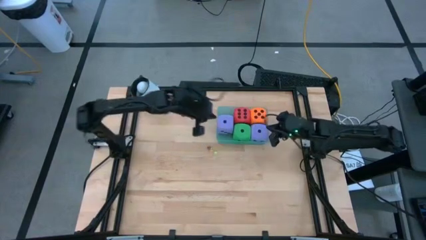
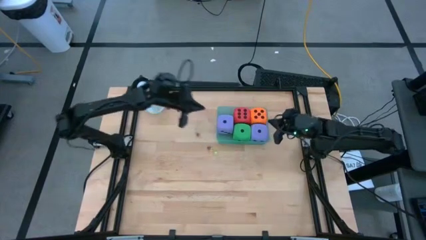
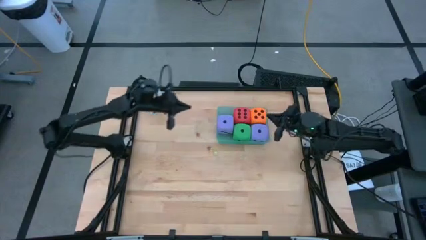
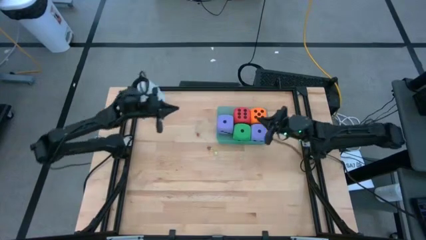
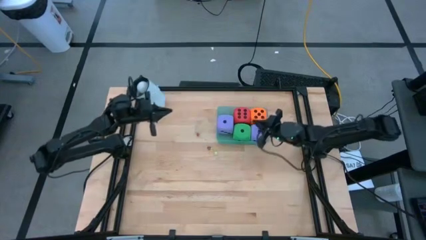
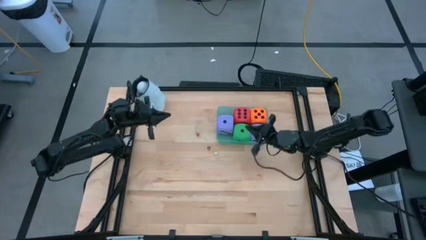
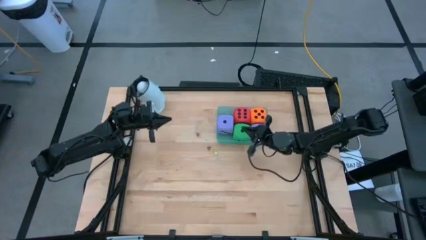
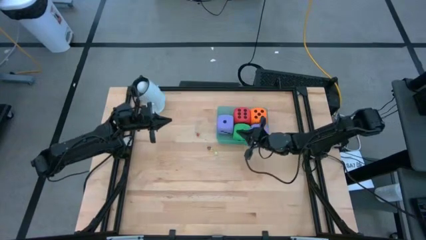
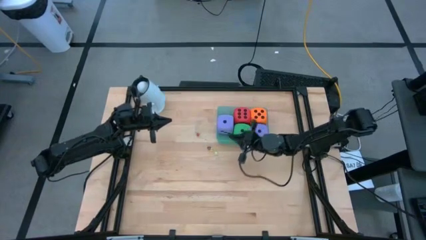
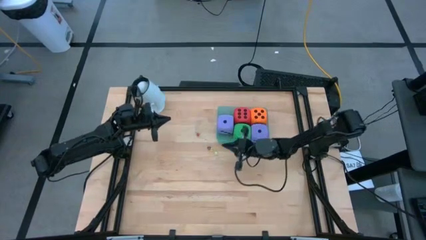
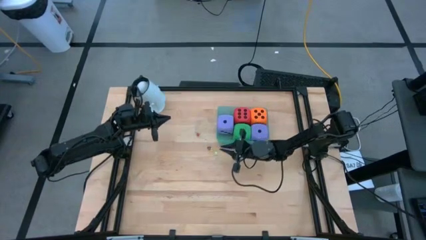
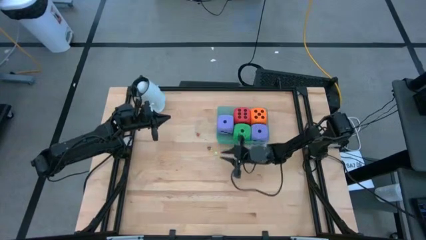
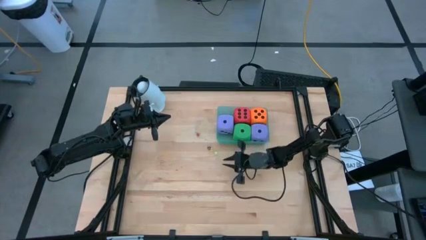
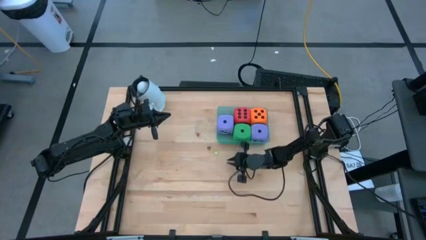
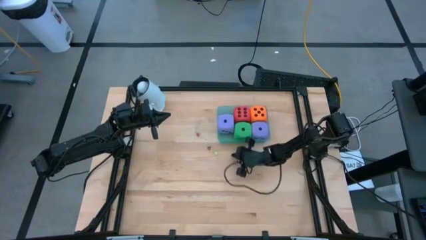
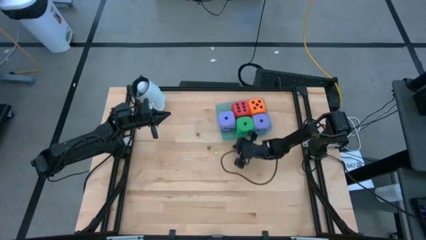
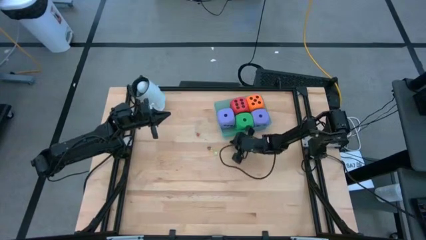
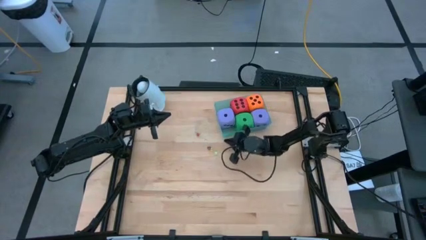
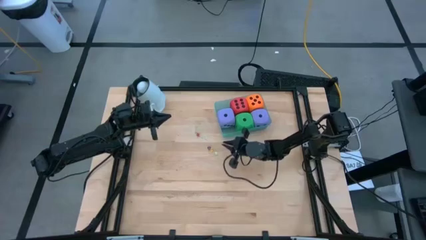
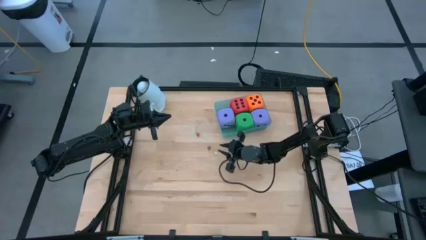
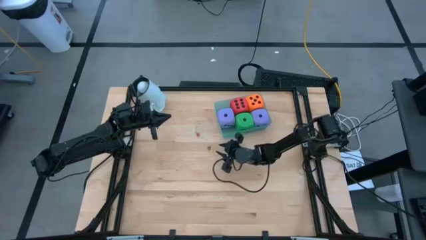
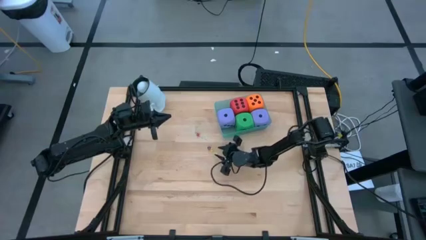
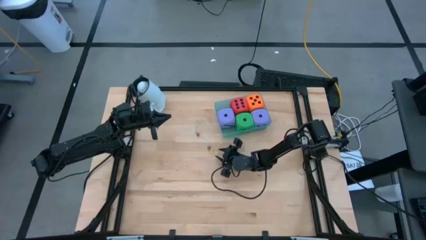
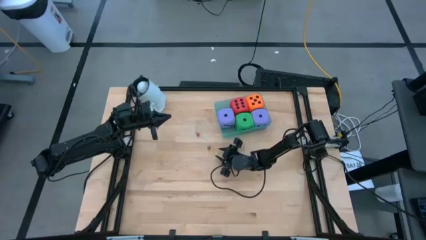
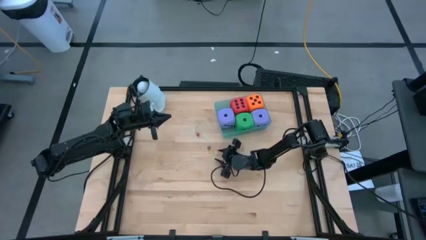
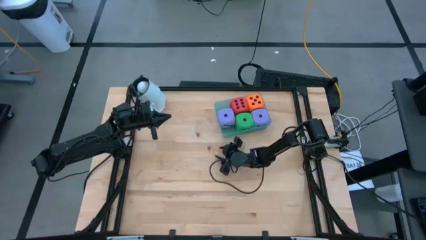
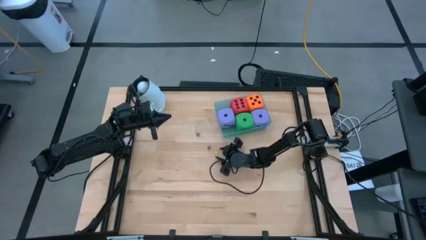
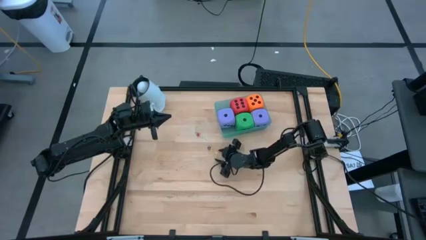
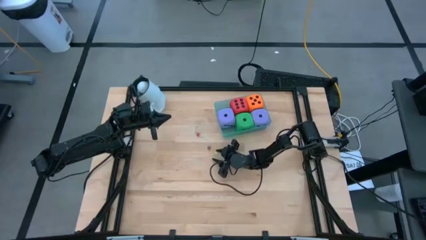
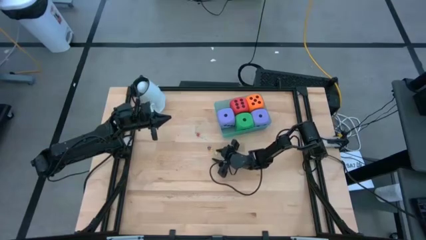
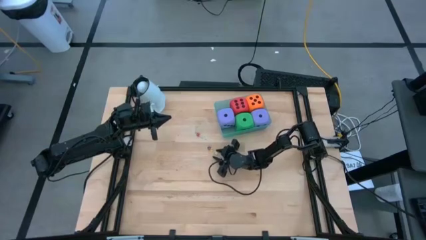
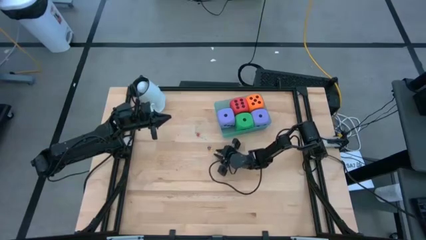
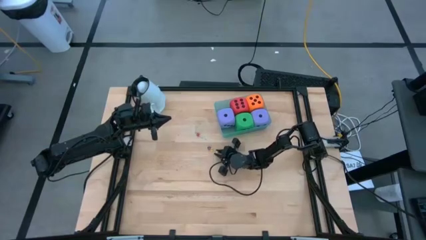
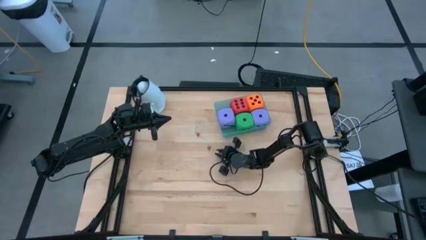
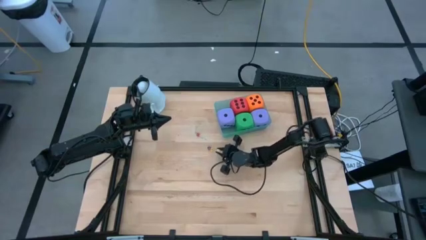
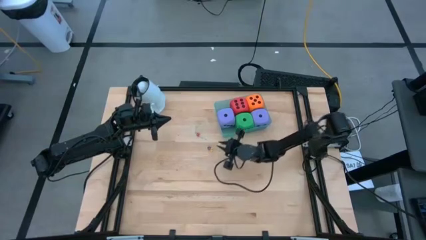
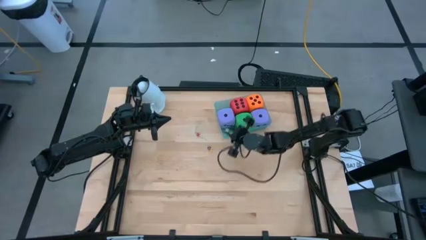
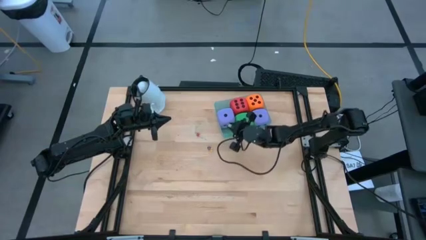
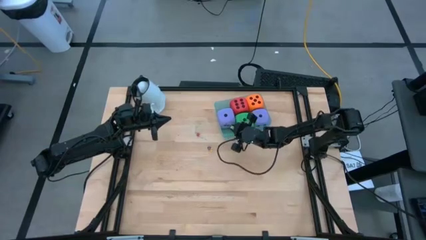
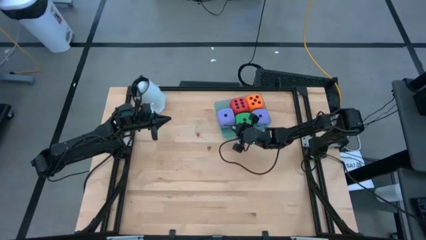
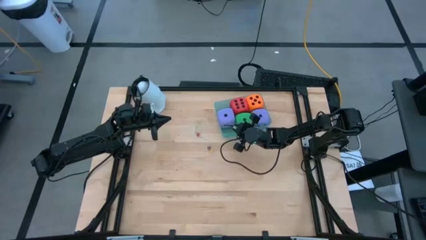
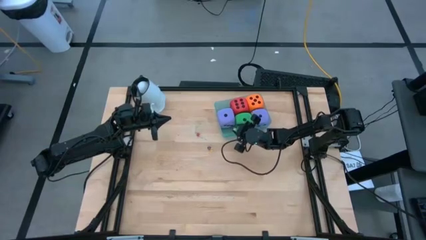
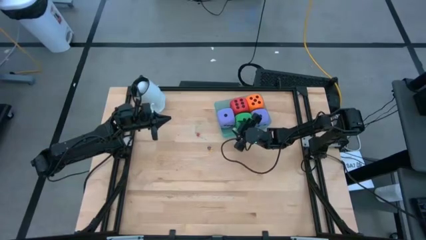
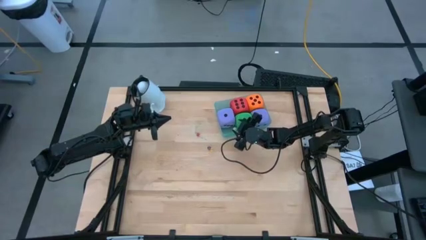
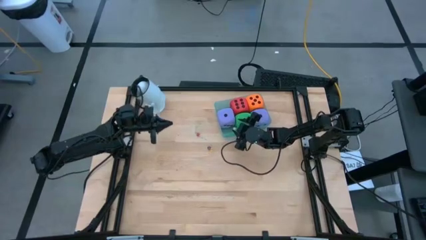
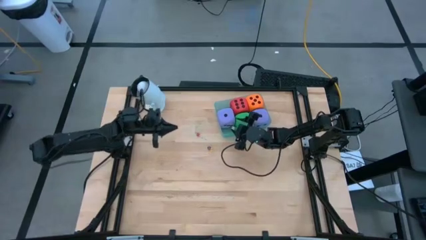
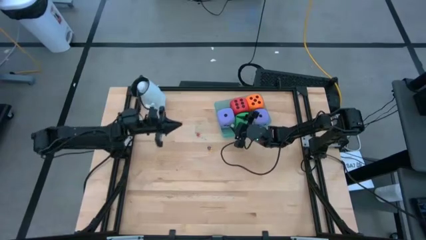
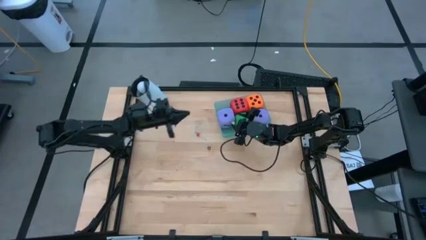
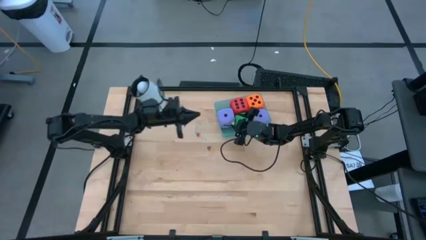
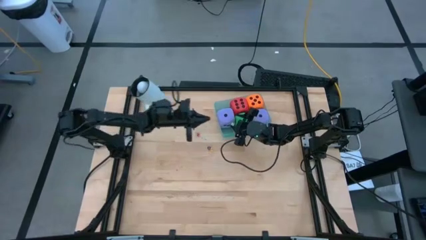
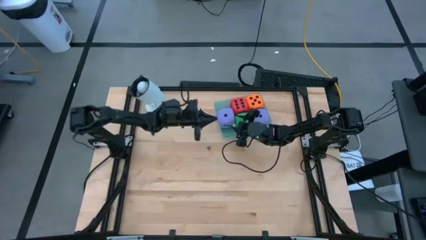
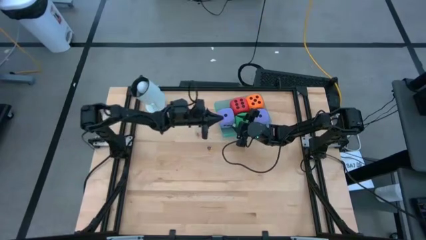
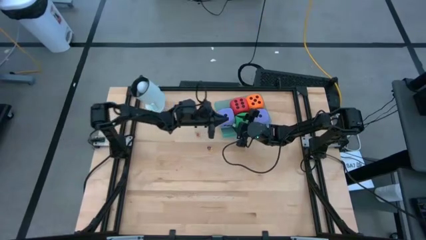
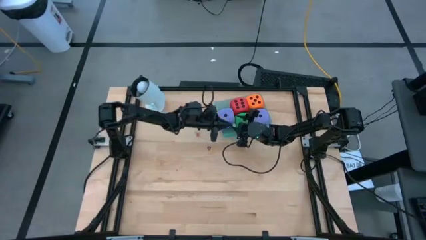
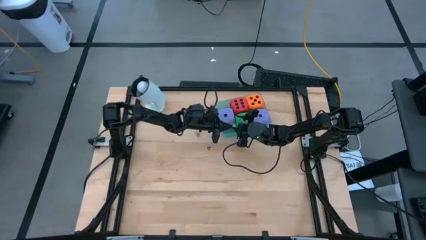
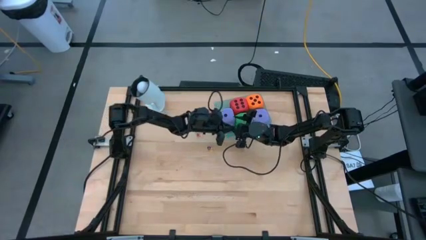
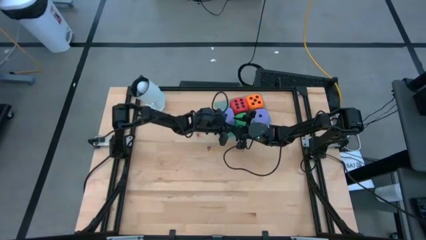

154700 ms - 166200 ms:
Task: Pick & Place Dice
Put the small green dice into the bin

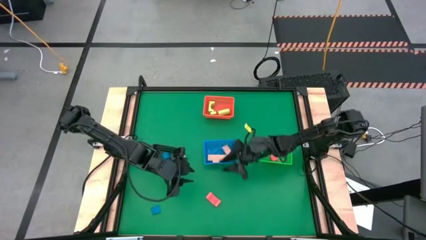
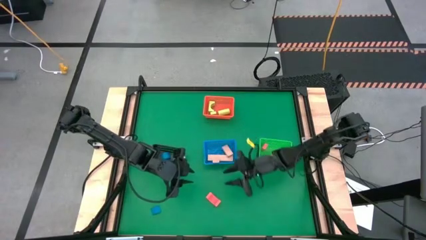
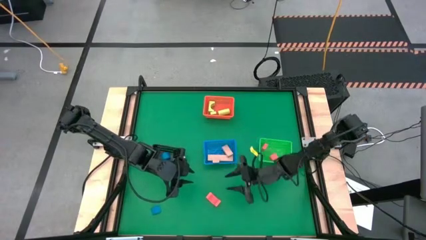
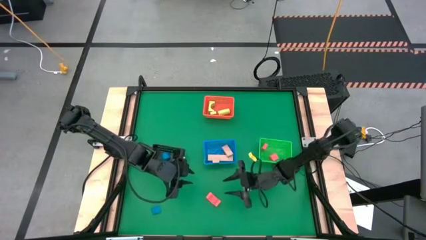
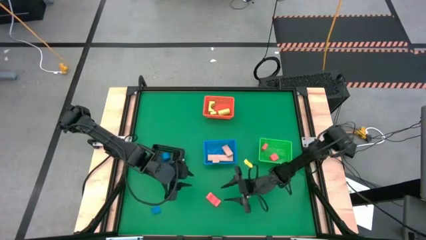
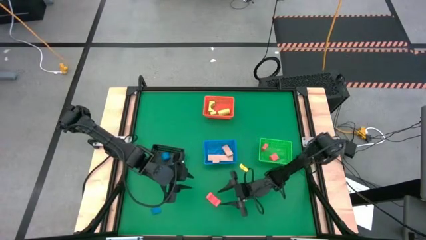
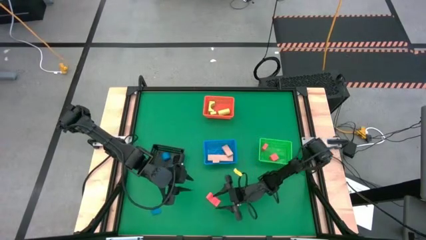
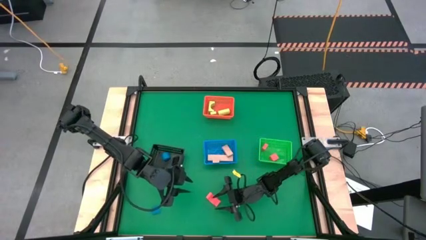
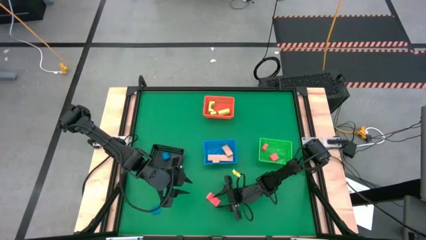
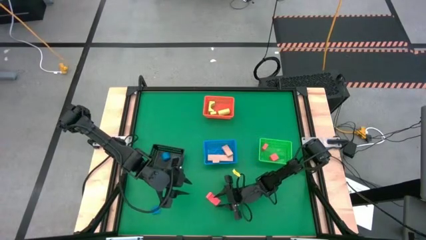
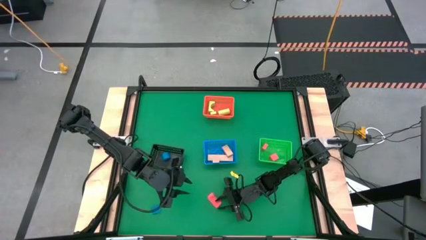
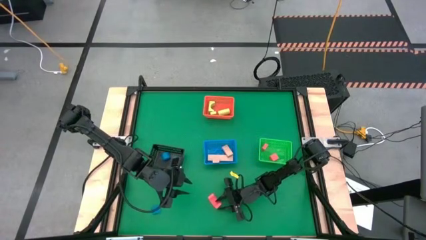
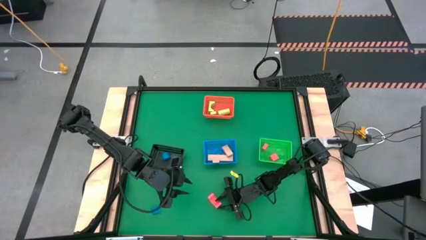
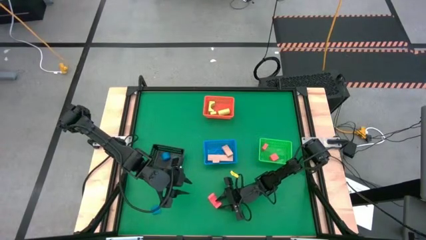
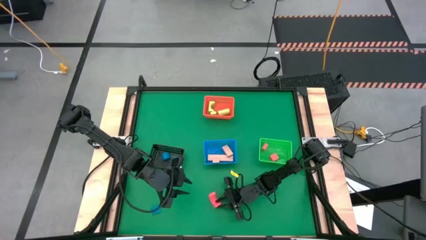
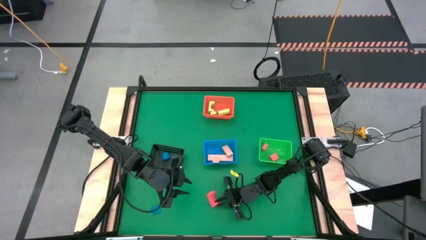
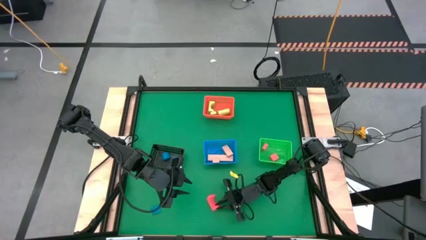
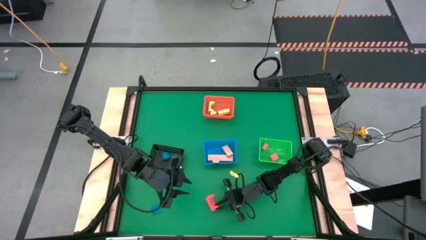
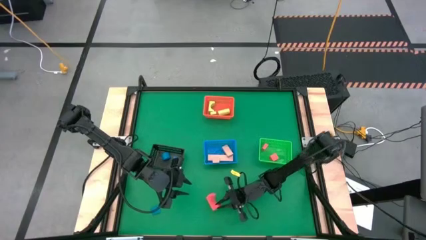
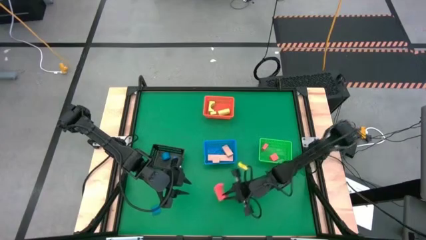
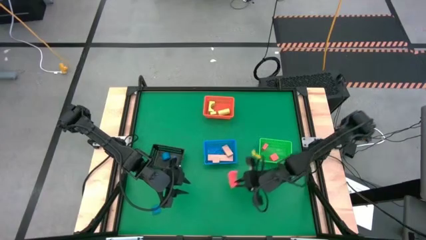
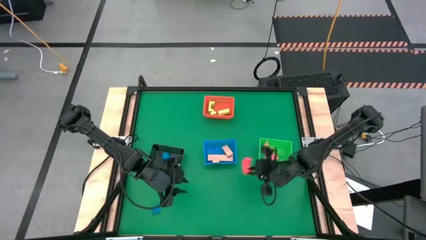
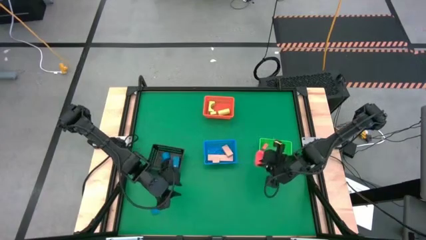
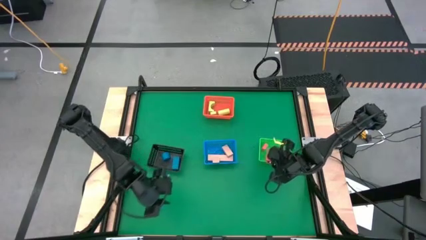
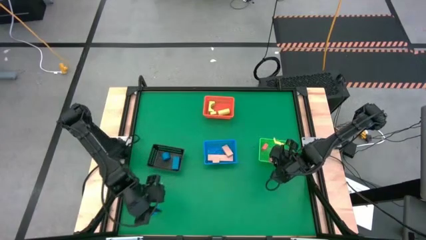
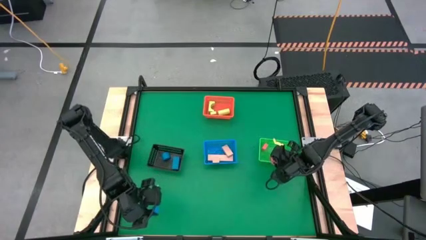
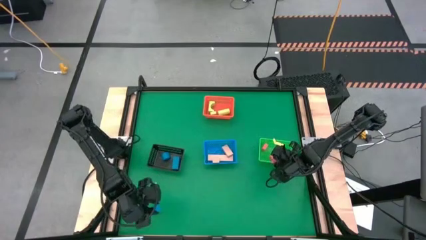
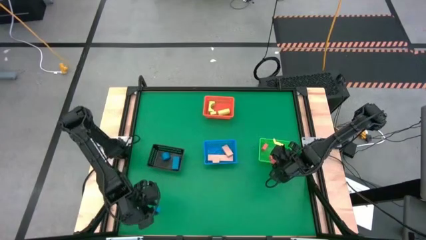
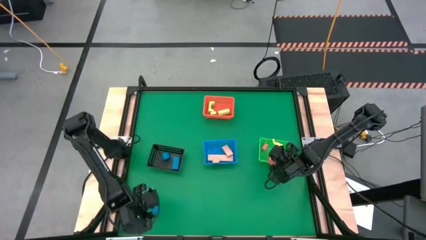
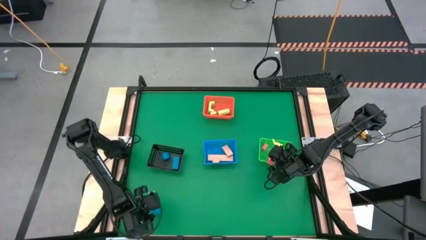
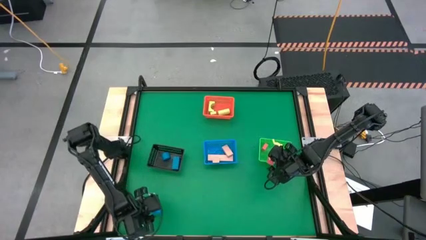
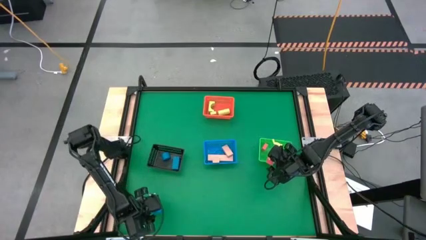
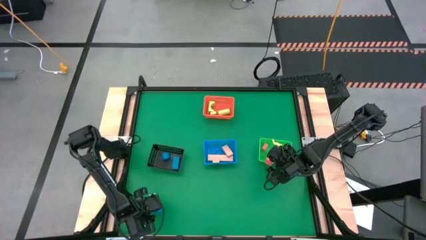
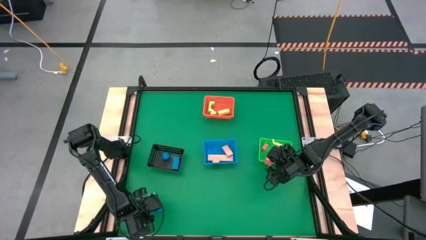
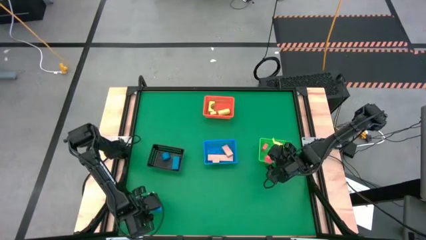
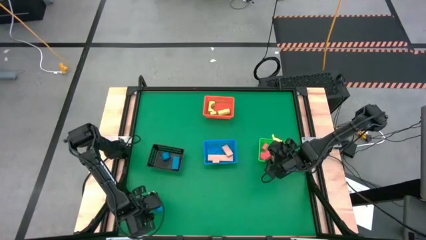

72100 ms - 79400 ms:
Task: Sort & place blocks by color
Put the red arch block into the green bin
